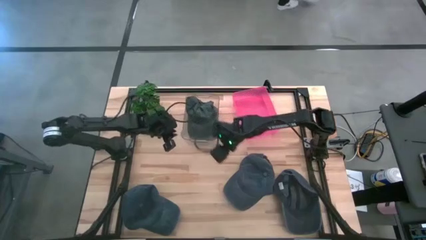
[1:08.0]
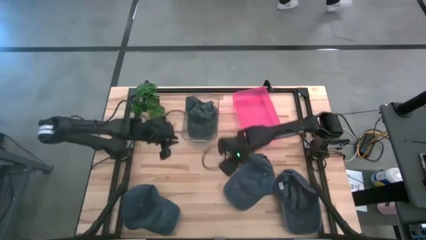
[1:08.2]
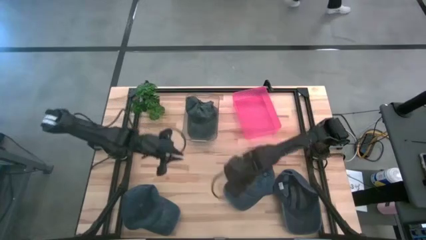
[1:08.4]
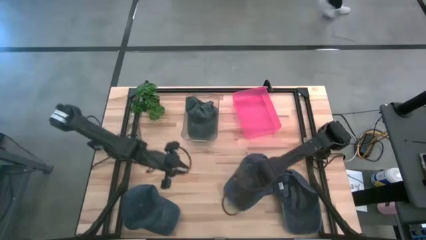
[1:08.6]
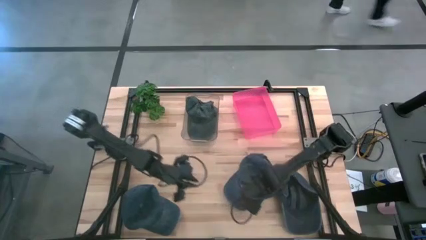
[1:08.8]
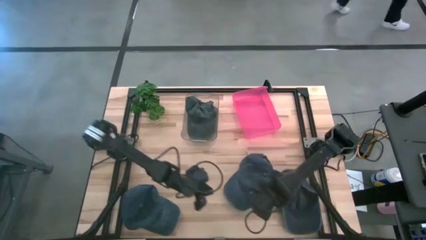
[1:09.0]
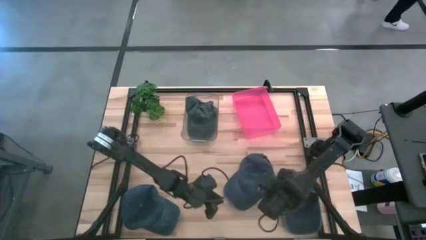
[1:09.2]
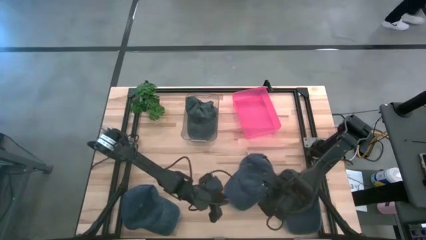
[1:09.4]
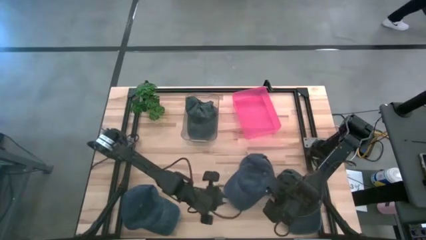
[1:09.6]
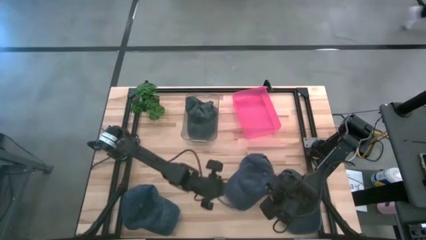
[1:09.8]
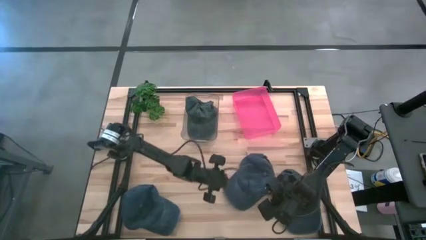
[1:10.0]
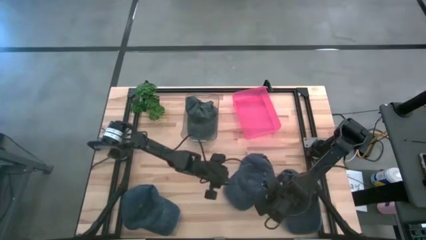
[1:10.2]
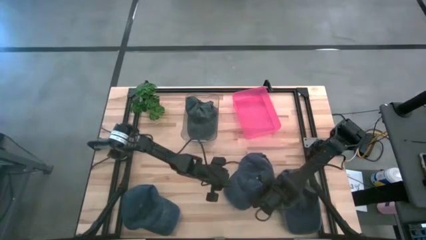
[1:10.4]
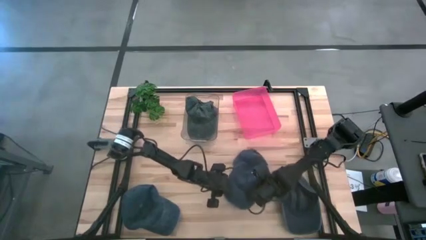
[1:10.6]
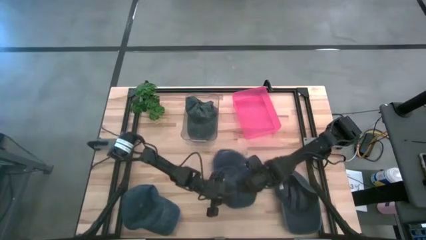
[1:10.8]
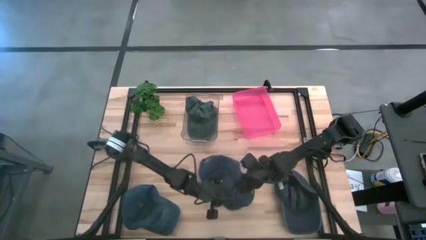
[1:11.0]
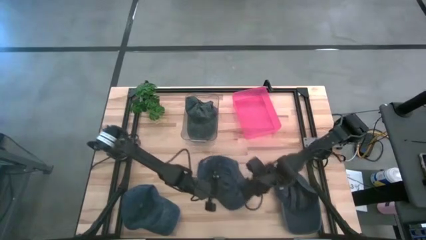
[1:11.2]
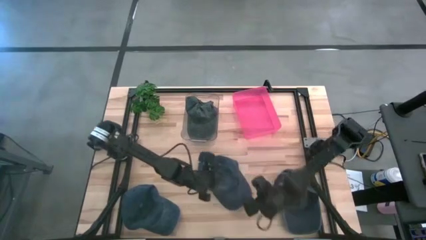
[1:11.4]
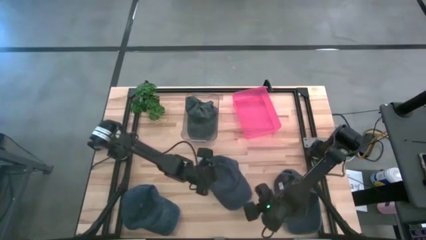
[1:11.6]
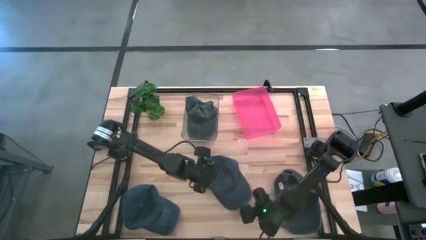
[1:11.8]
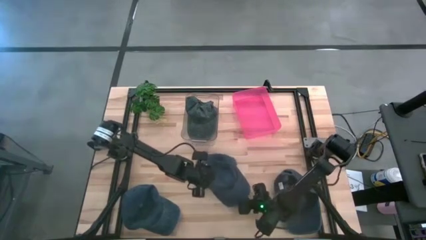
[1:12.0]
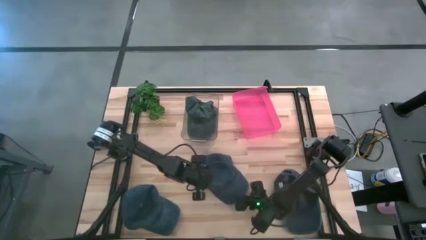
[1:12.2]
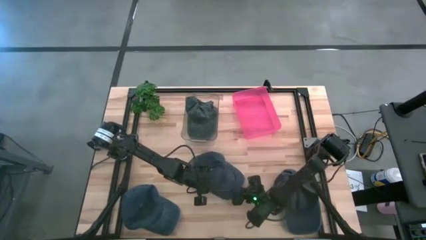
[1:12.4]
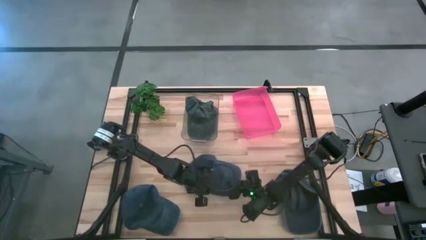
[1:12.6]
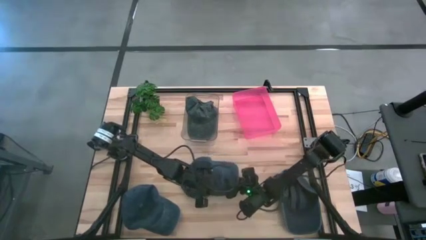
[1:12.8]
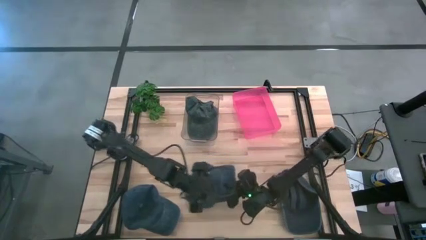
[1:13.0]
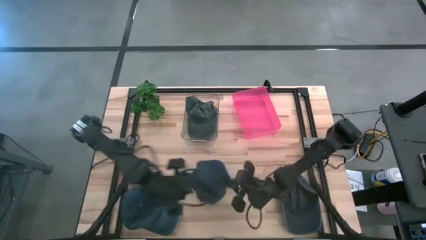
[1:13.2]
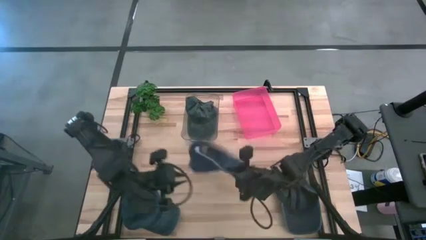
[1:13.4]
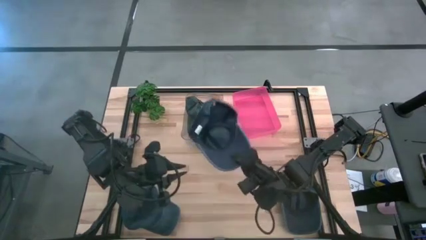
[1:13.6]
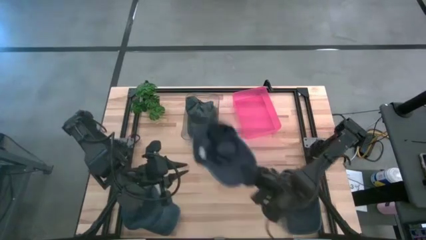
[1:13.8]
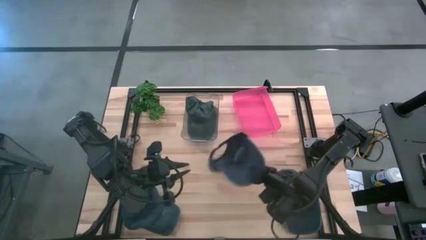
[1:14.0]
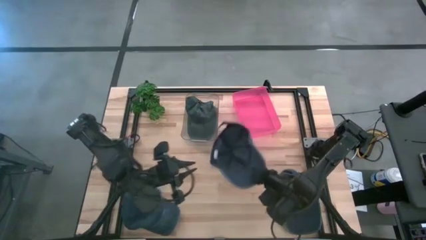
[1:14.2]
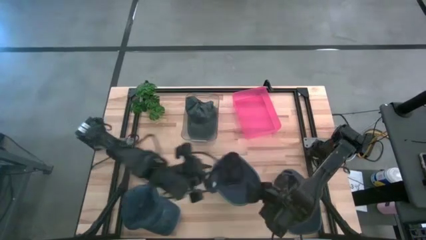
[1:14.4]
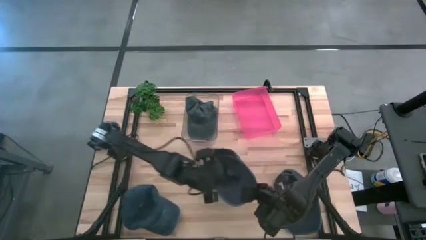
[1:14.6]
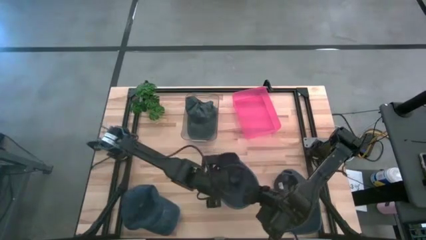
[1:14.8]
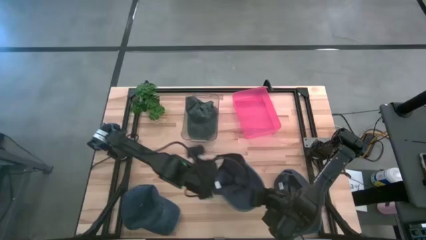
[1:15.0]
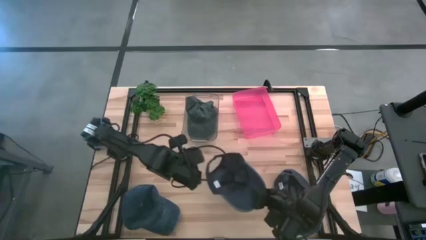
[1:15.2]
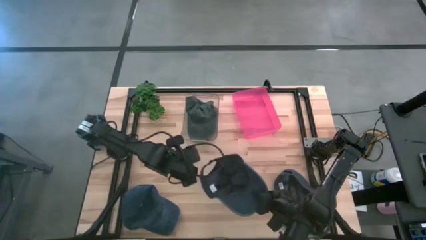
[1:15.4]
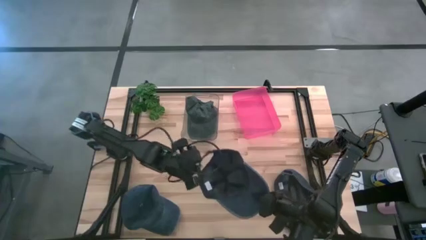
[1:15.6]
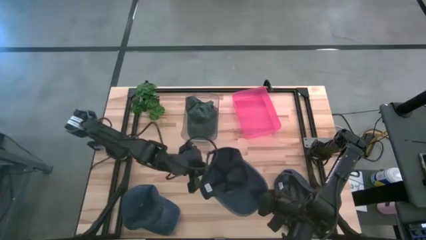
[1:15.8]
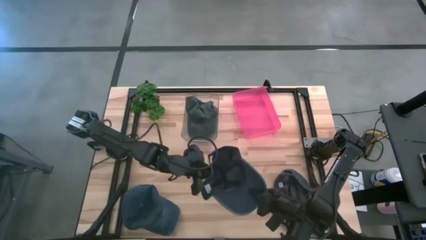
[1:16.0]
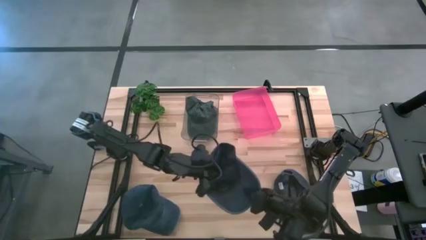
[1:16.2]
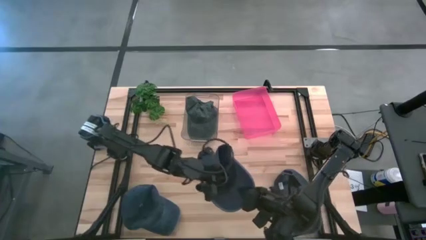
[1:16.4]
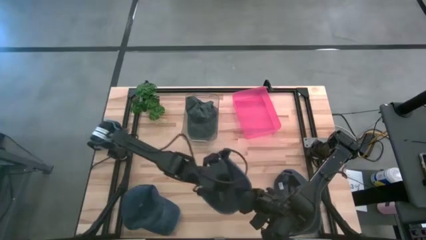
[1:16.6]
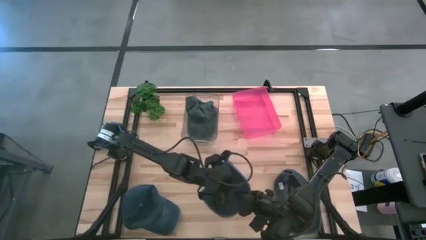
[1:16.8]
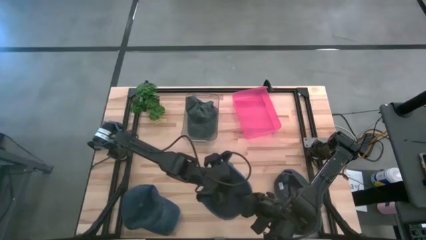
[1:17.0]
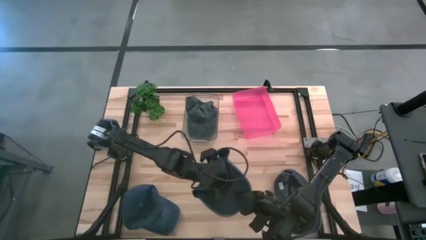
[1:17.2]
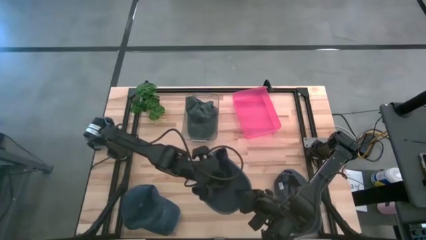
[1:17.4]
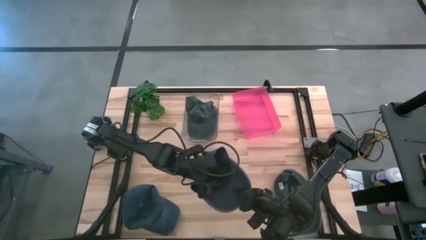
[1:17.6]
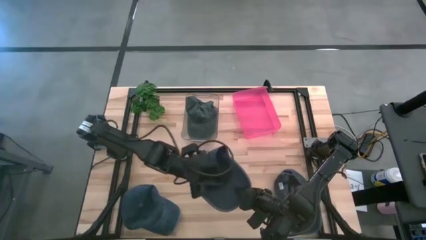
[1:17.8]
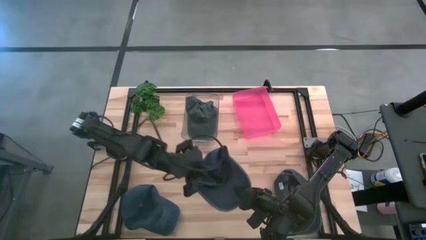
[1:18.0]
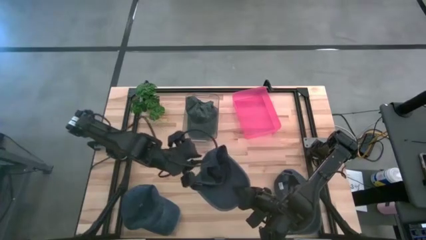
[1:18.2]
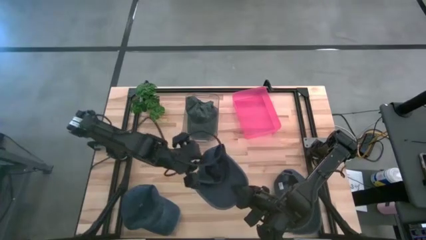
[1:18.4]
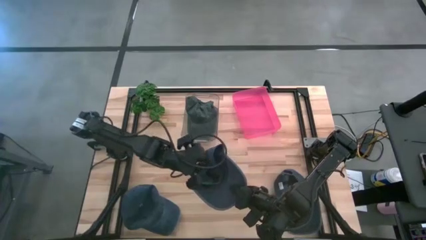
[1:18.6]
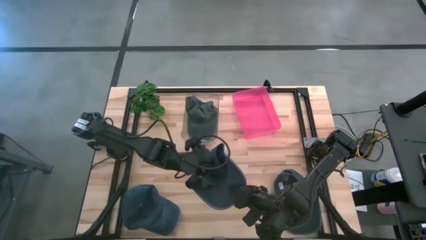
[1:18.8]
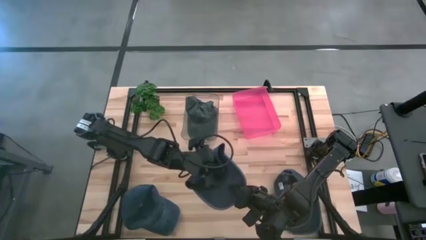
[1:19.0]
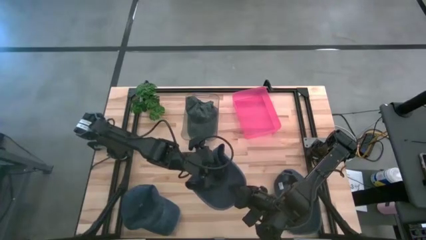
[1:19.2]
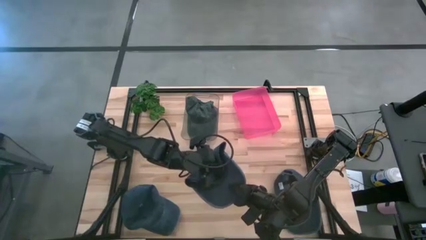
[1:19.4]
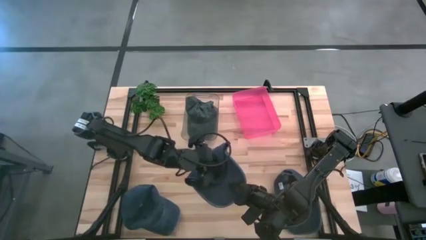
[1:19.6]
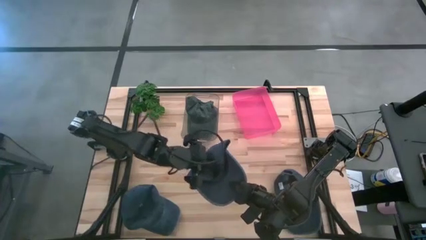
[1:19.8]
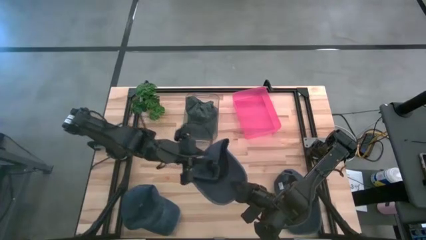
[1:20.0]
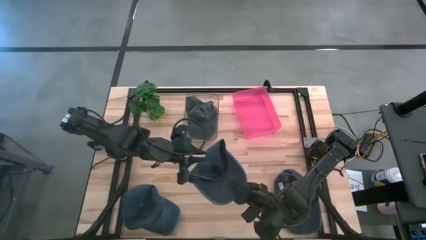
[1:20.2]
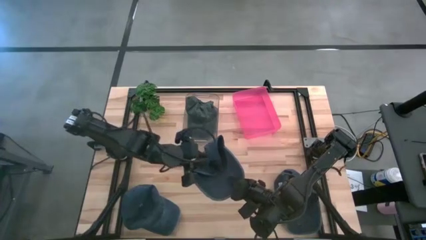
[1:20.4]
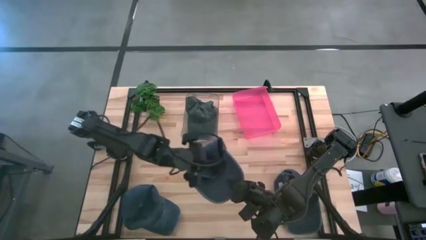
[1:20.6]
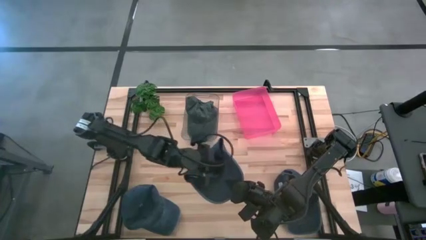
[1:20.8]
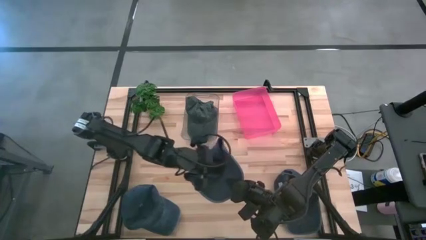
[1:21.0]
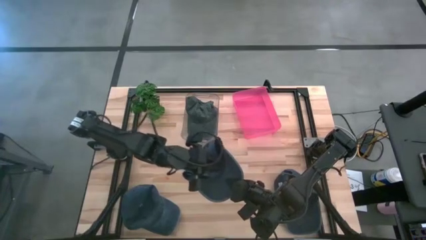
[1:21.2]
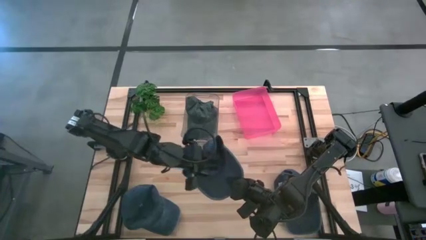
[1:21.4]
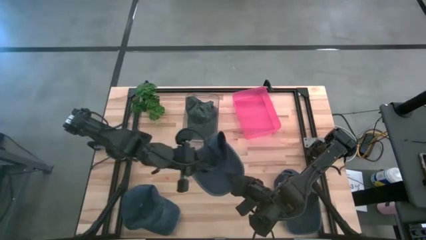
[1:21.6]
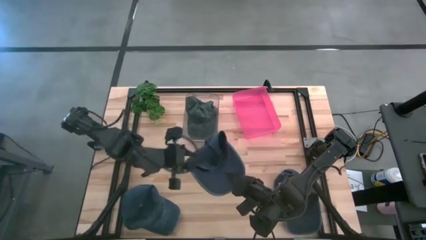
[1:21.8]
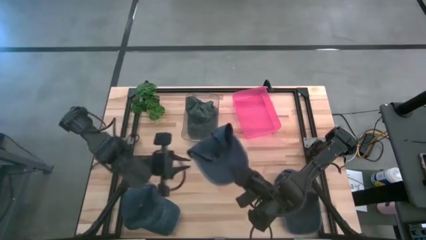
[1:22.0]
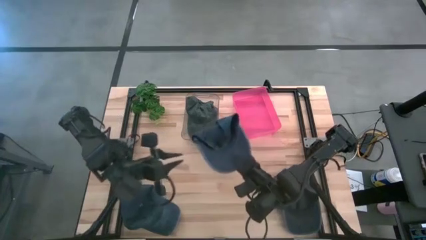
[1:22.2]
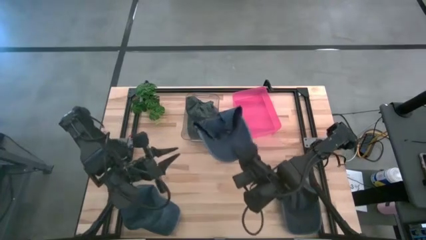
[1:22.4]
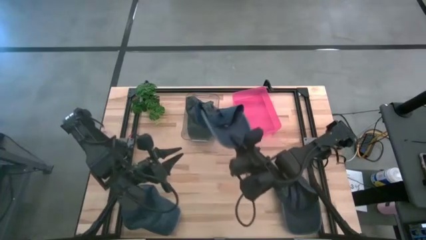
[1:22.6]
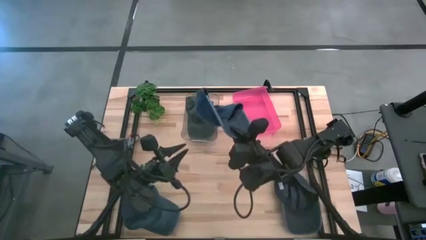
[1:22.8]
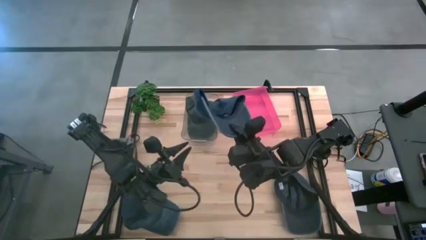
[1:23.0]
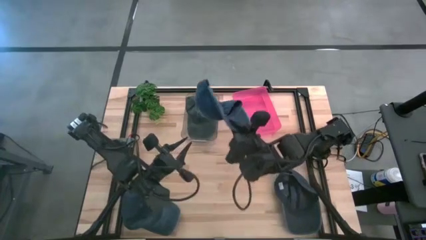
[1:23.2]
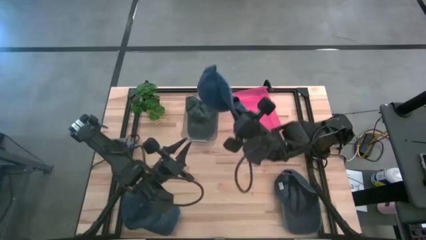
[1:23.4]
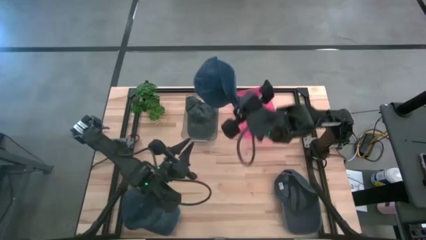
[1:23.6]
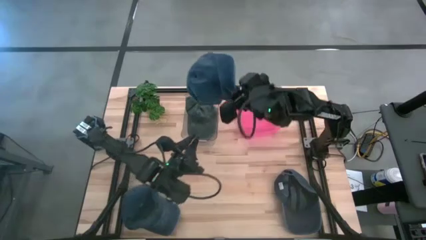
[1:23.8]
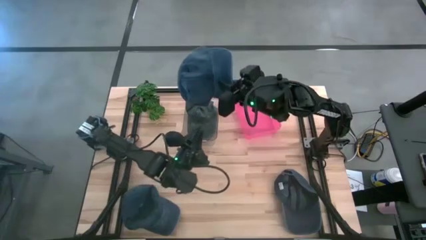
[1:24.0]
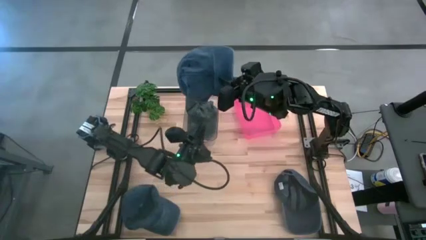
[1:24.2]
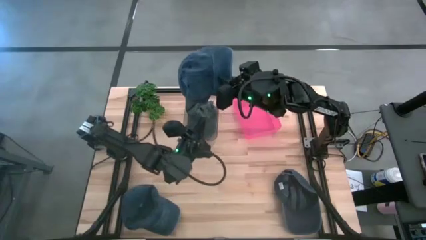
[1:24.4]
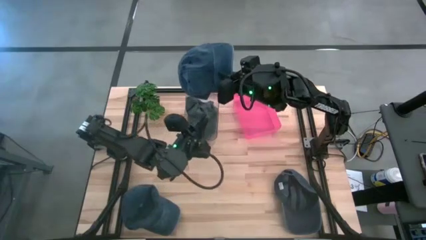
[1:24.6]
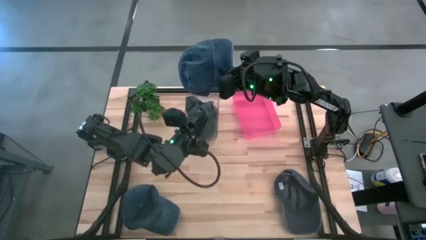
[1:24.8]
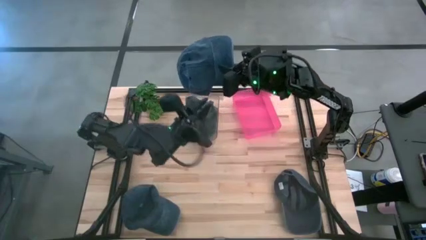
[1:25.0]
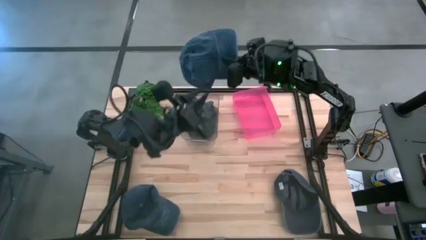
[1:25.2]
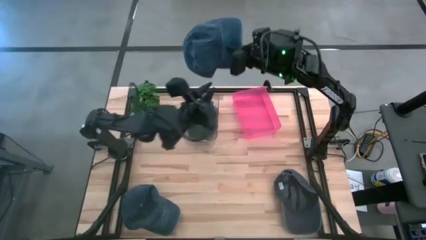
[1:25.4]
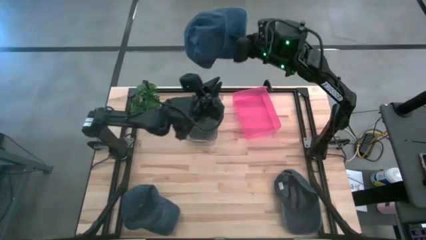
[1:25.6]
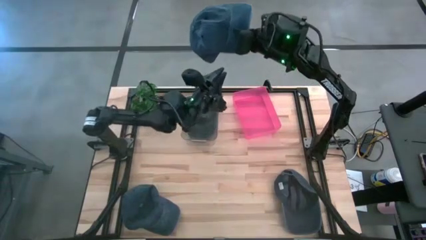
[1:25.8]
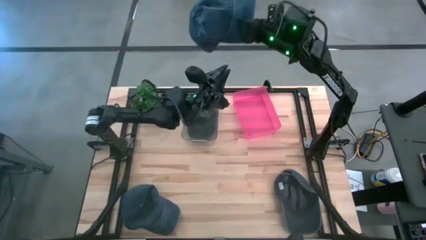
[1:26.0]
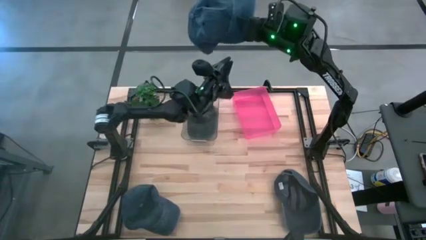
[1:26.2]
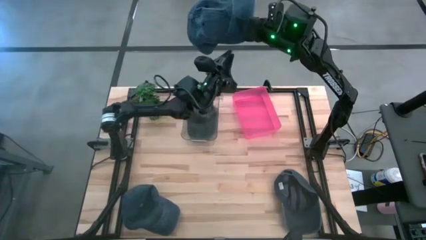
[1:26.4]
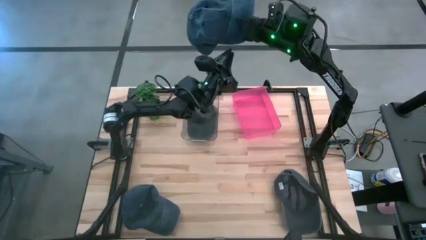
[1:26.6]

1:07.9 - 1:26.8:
Task: Pick & Place hat
Put the middle blue cap into the red bin
